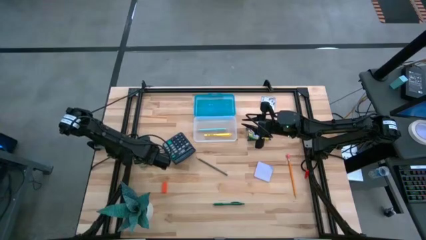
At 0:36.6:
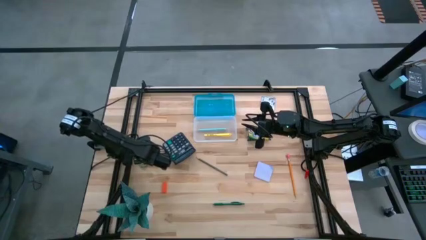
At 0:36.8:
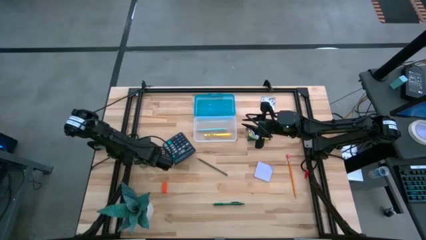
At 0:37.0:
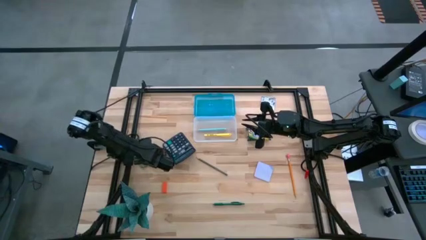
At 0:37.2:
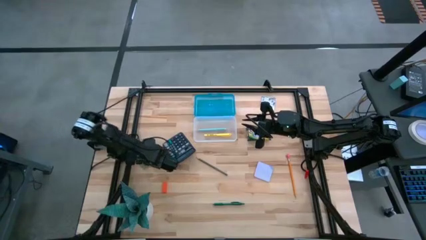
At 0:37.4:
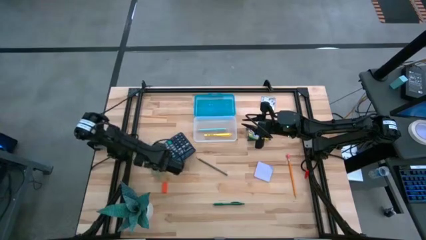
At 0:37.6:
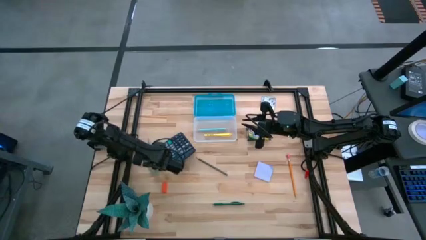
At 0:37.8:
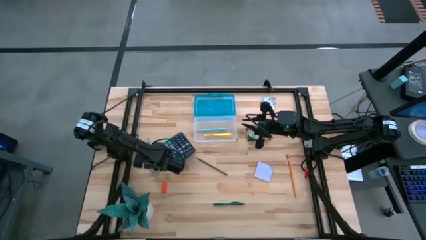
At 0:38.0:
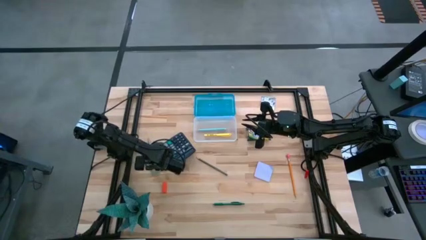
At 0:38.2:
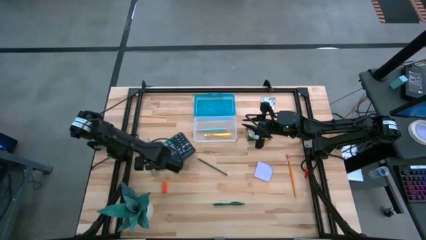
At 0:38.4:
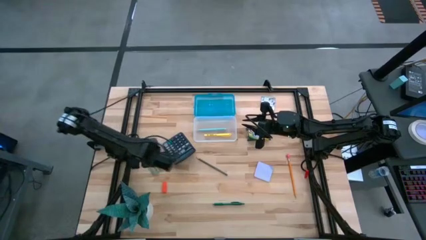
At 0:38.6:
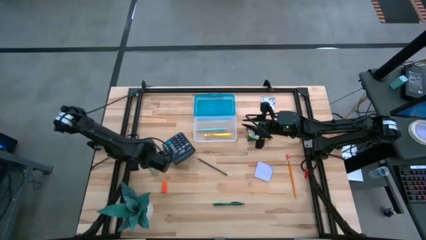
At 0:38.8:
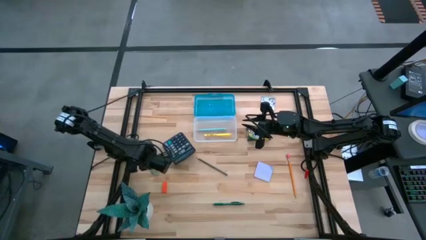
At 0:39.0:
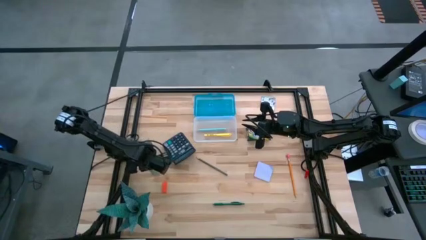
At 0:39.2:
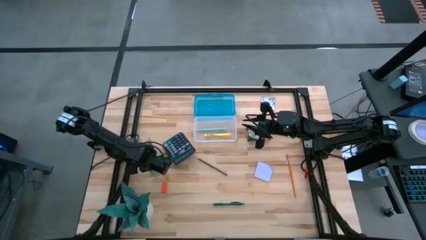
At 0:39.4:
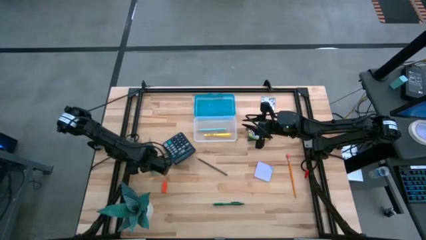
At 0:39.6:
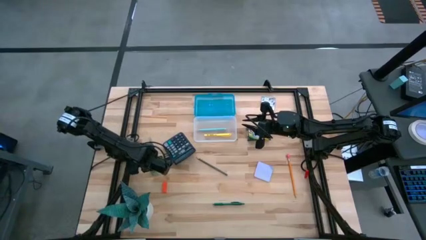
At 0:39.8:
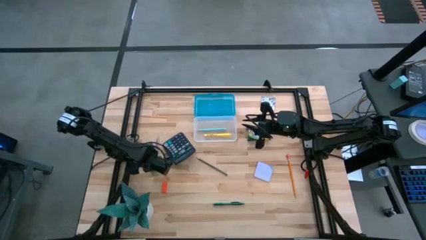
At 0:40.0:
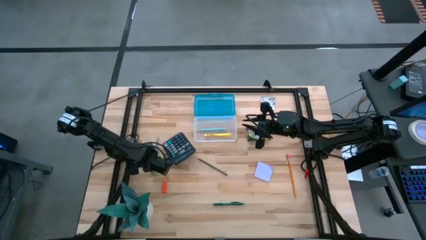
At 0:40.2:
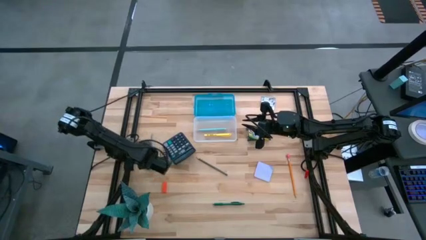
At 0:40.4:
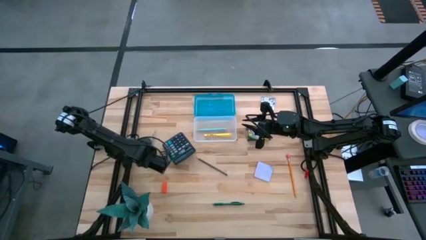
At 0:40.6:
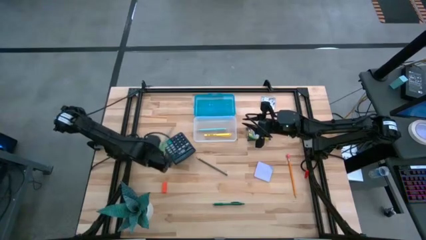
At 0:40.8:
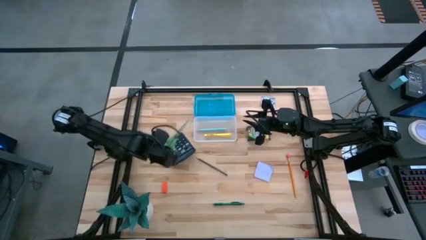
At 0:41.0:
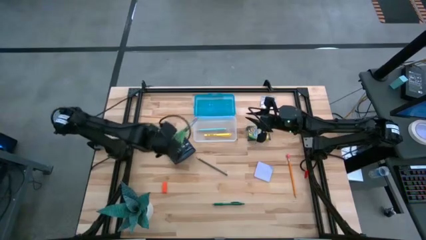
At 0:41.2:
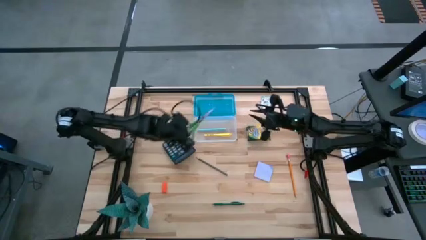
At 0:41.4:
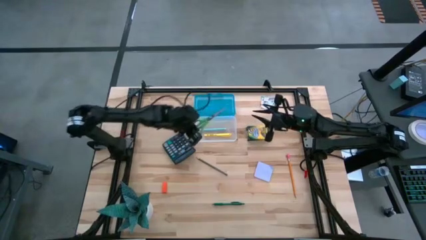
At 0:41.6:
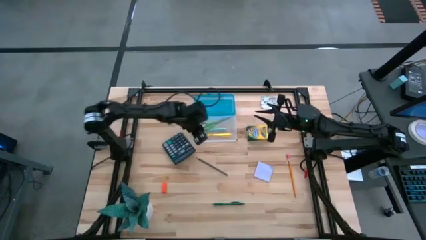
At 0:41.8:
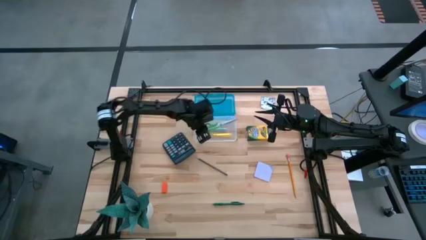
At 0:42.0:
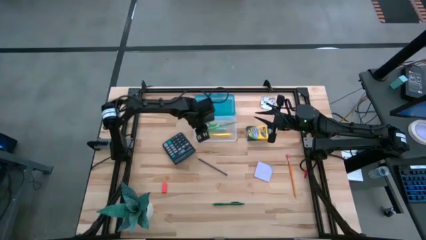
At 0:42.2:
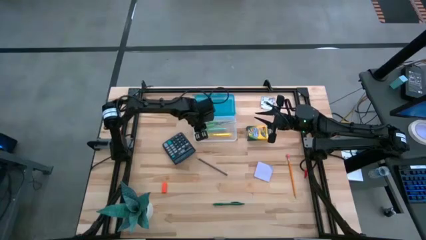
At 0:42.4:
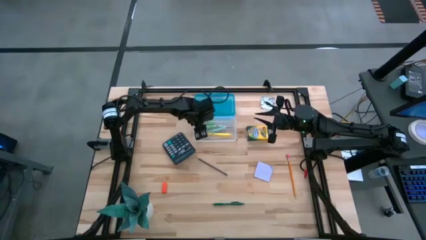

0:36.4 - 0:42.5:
Task: Pack school essentials
Put the green scissors into the blue supply box

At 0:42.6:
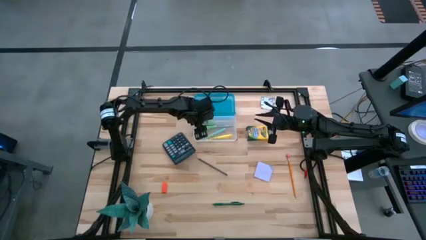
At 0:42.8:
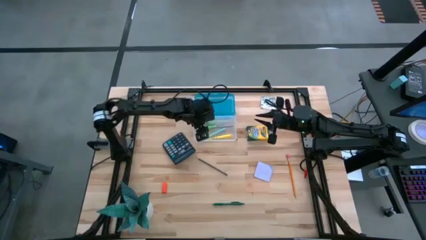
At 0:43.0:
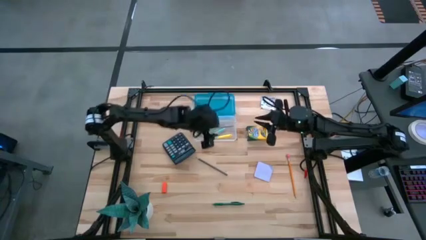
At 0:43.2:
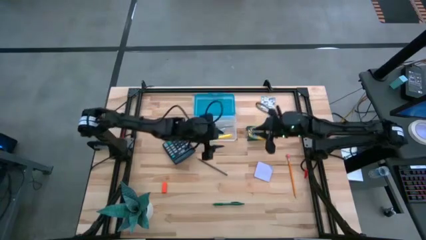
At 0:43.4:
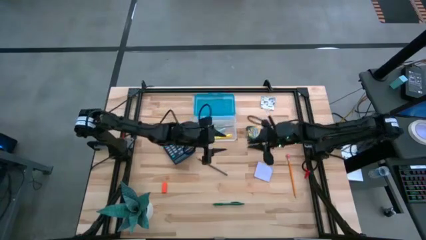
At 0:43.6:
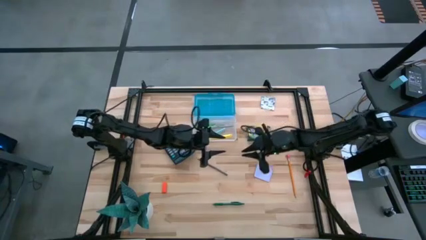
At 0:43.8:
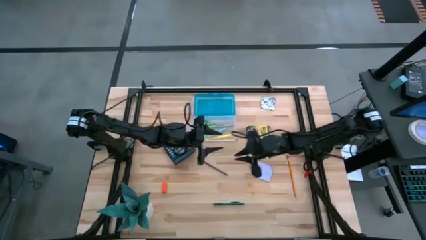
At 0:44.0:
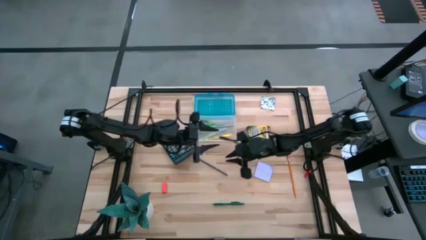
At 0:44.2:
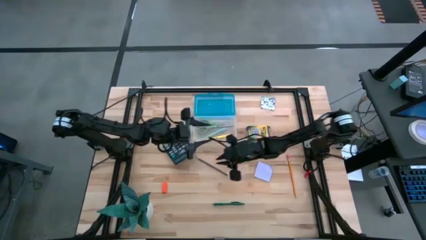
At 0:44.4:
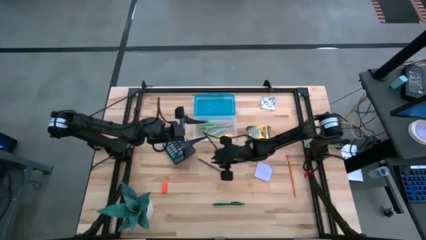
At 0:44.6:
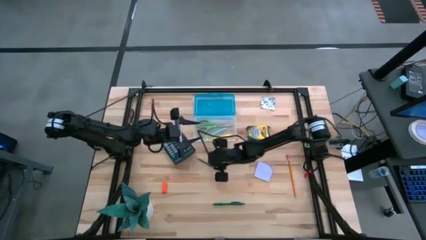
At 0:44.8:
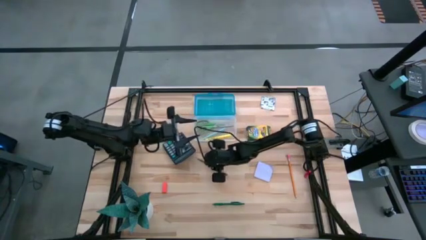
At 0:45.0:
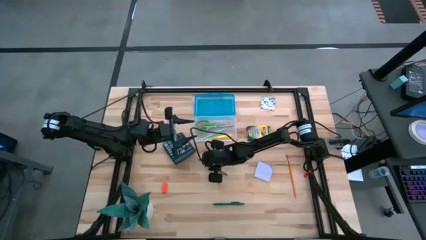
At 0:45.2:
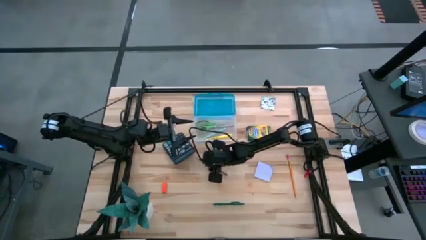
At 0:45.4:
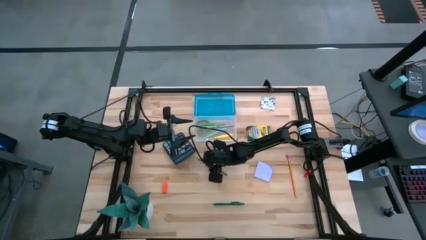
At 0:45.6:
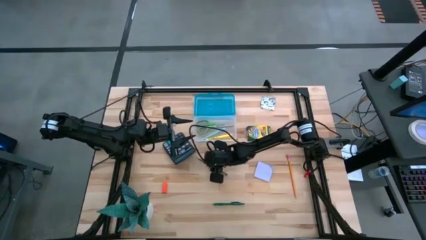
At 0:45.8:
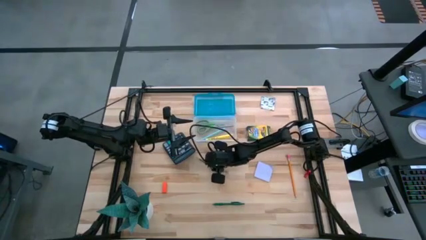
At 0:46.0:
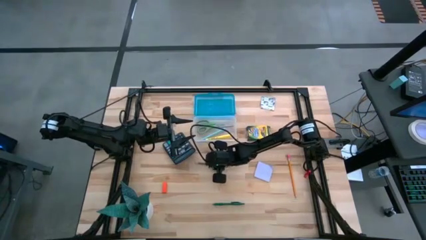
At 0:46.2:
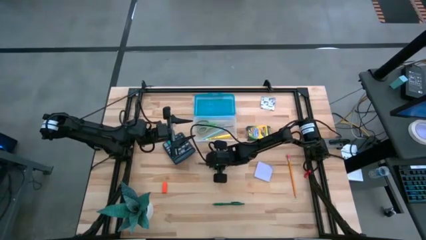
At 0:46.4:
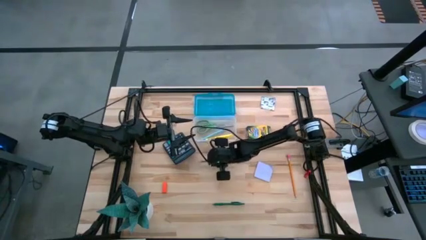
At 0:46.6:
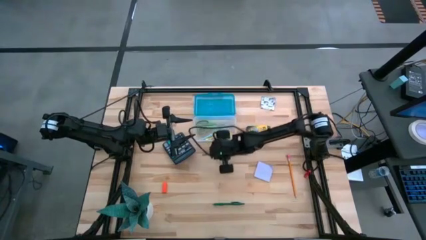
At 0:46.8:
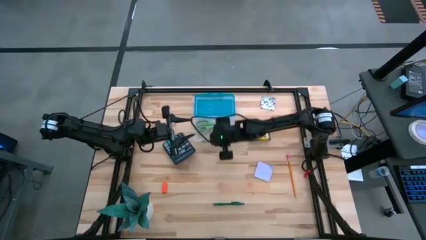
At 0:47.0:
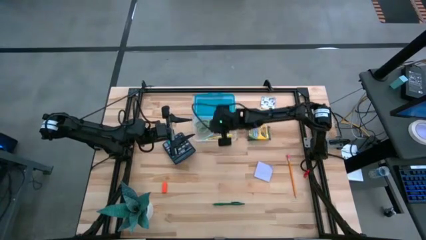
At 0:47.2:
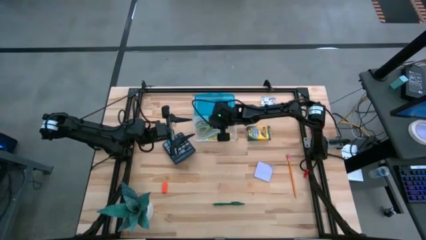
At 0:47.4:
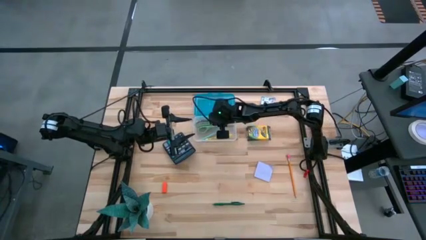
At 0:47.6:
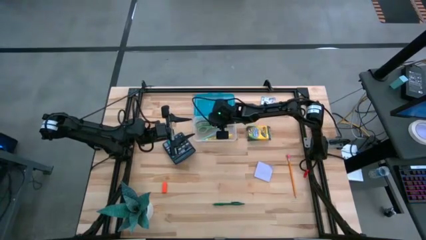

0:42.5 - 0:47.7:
Put the black pencil into the blue supply box

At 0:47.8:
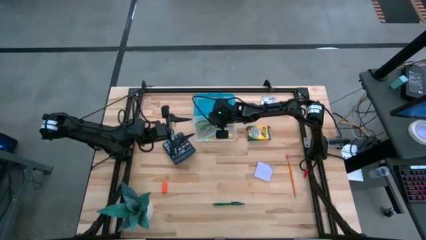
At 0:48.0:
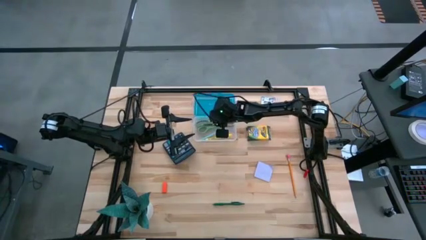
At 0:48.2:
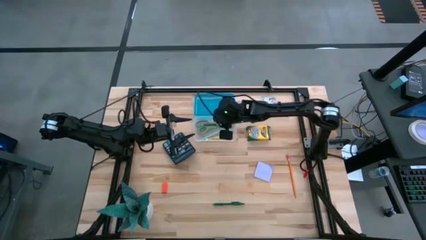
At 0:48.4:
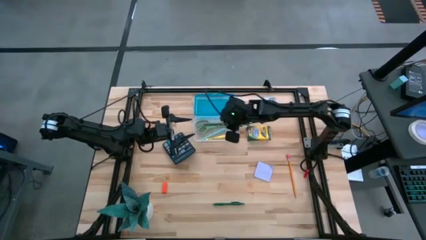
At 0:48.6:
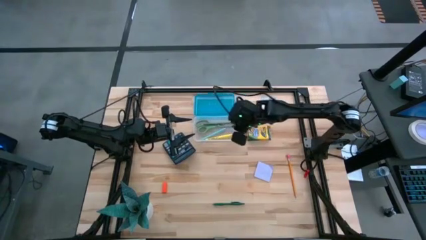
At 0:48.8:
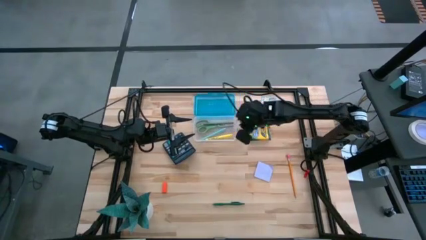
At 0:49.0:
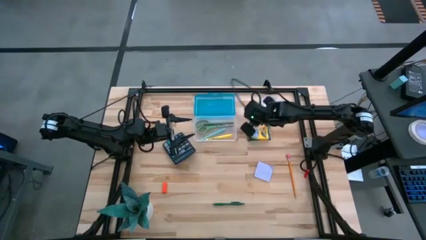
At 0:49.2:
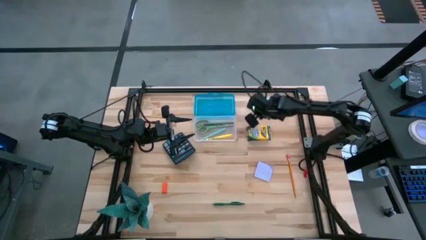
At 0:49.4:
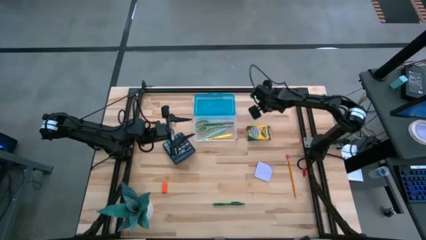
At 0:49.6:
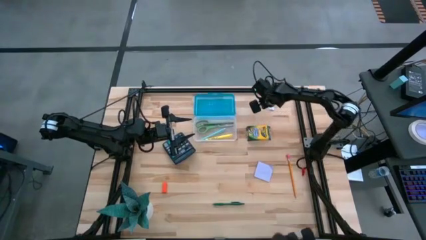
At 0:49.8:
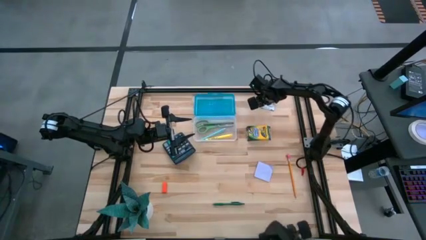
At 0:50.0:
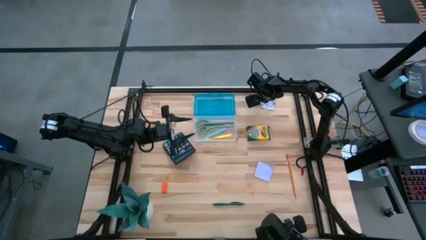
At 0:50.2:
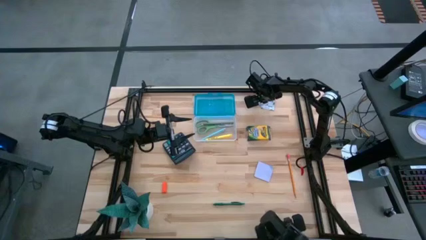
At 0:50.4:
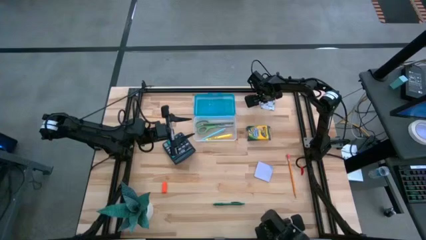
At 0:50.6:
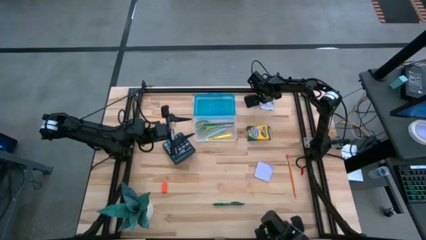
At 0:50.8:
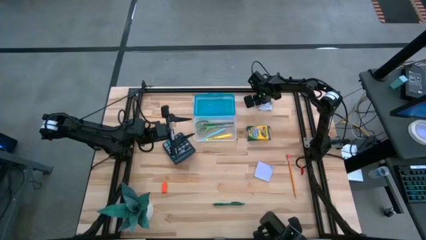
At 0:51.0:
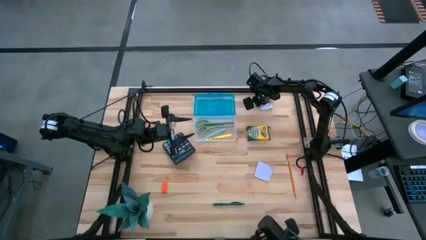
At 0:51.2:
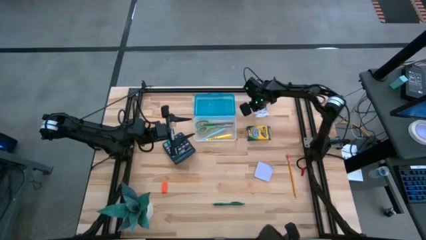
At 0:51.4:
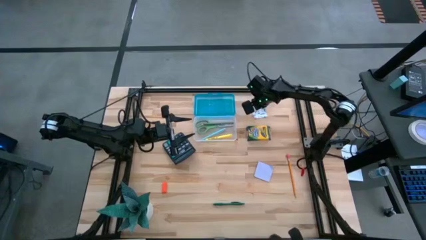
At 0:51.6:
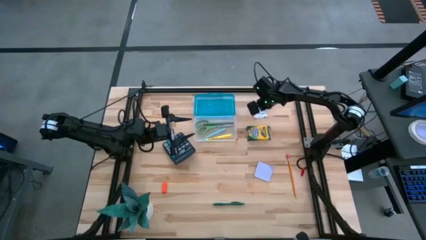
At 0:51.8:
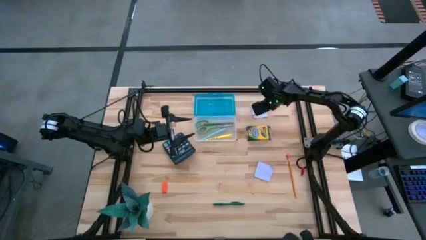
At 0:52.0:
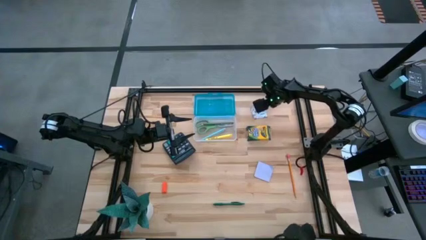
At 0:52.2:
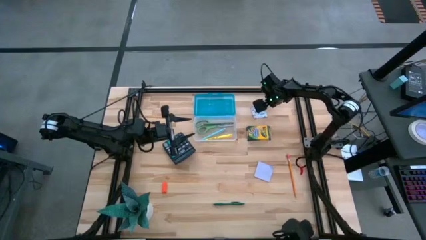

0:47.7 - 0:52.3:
Put the white sticky notes into the blue supply box

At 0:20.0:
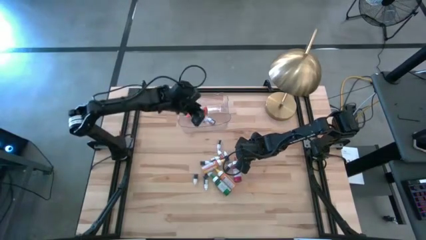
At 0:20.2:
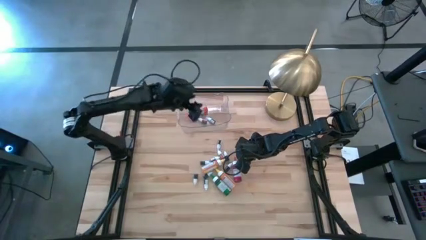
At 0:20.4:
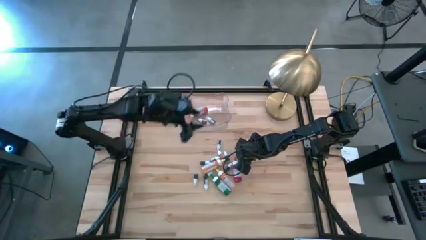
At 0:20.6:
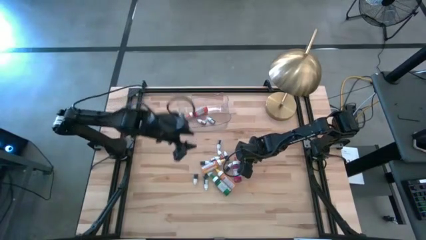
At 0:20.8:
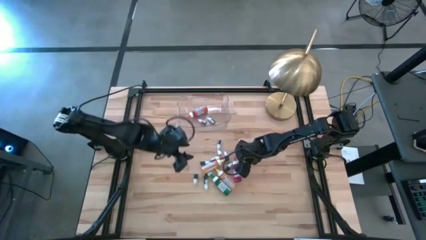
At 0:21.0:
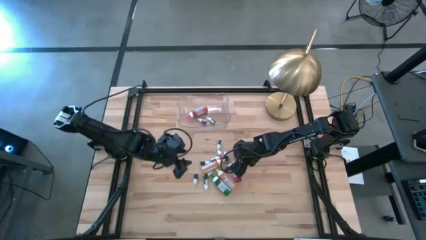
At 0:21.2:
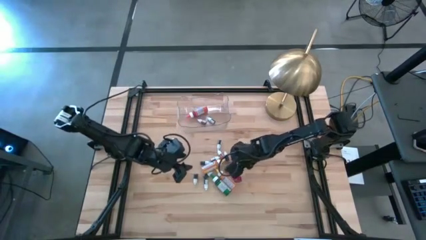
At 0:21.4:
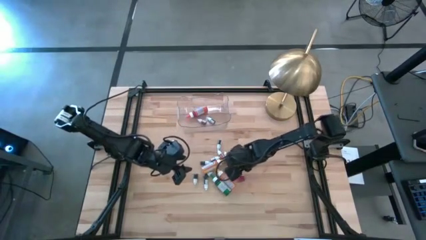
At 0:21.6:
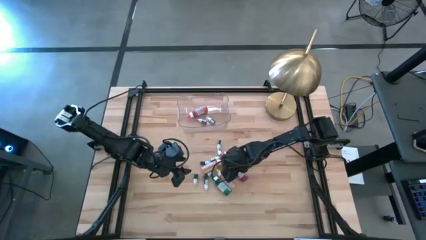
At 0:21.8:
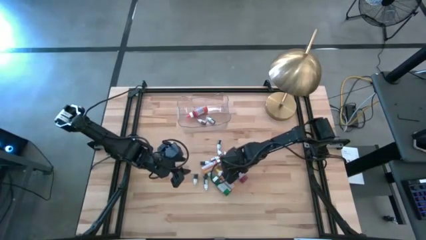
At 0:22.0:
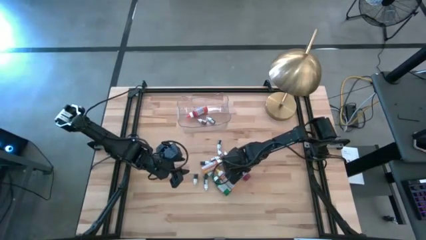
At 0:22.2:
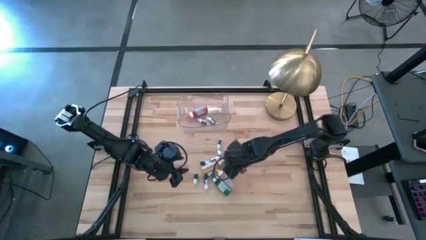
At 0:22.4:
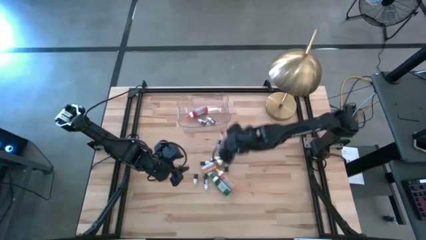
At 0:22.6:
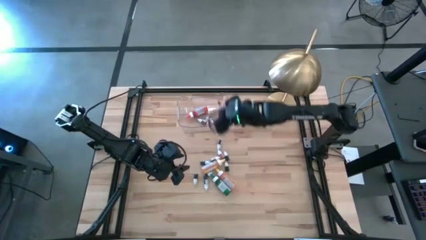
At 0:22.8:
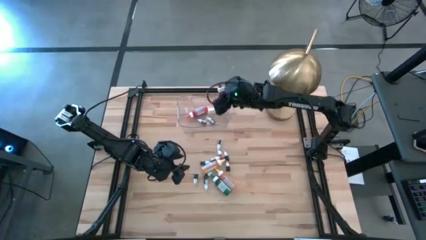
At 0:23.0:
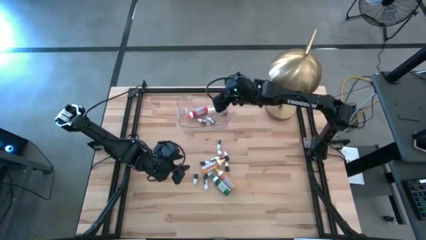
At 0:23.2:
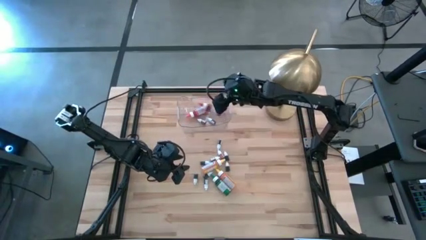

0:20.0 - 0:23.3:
Task: Pick & Place food coloring
Put the large red food coloring bottle into the transparent bin
